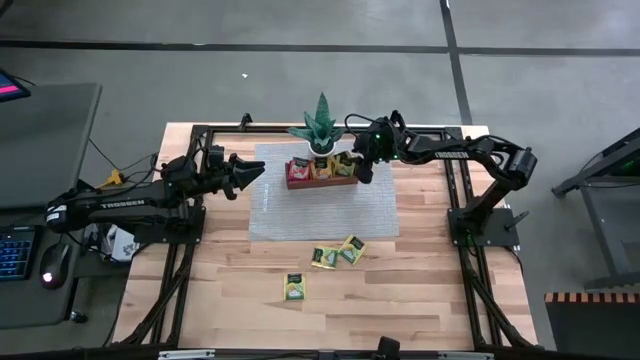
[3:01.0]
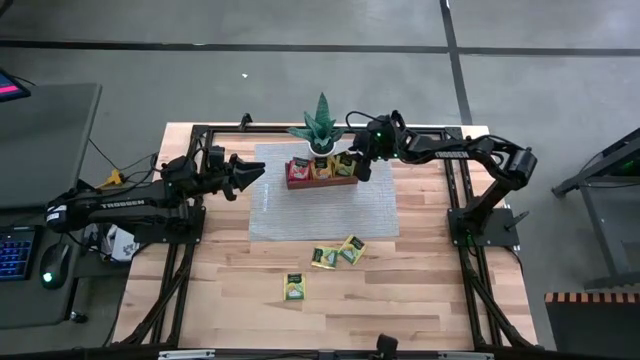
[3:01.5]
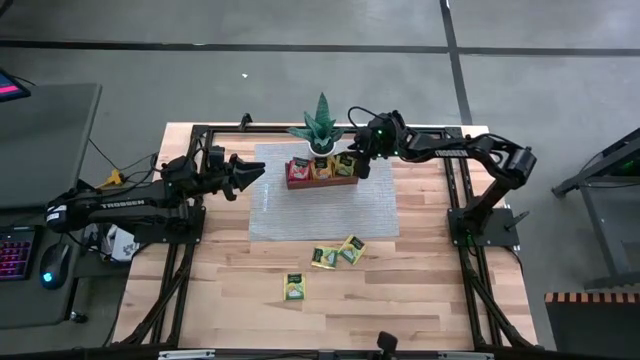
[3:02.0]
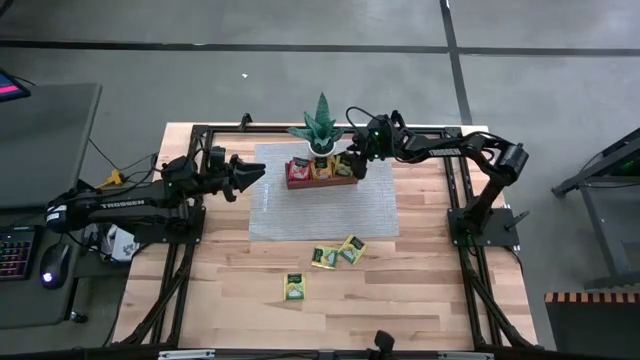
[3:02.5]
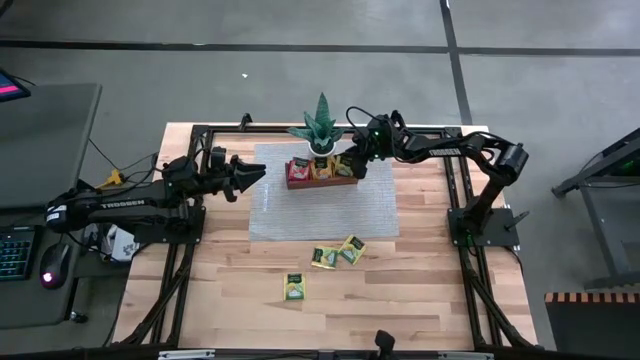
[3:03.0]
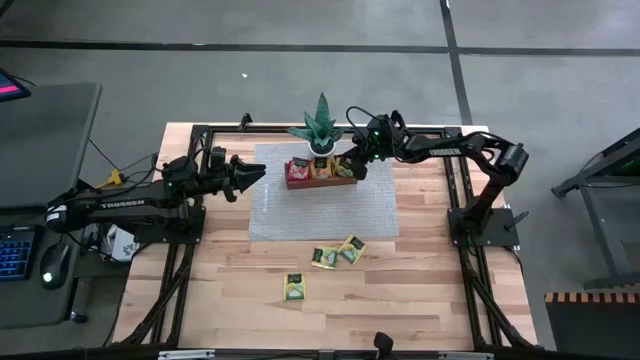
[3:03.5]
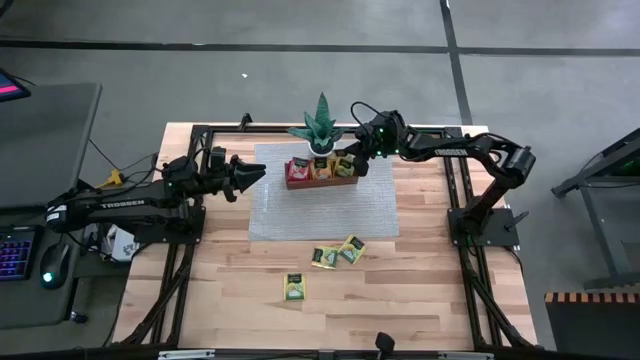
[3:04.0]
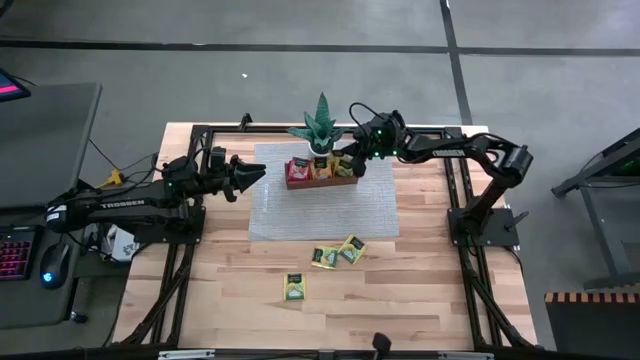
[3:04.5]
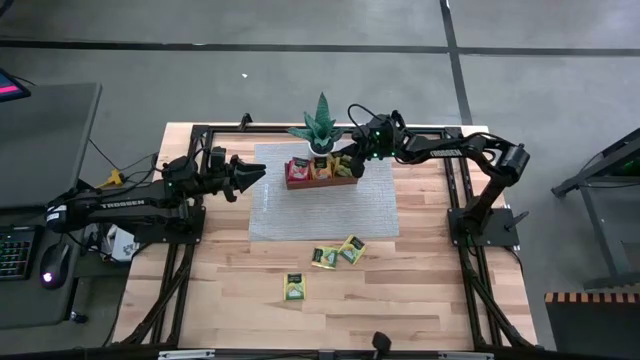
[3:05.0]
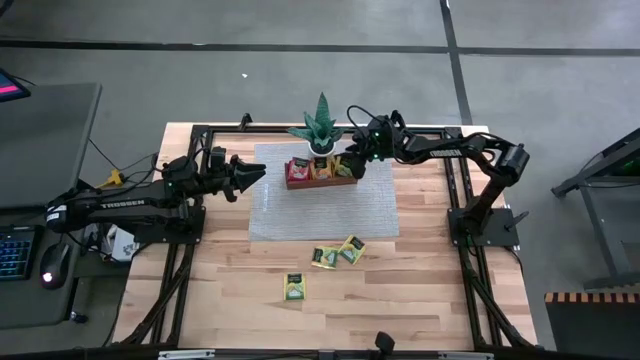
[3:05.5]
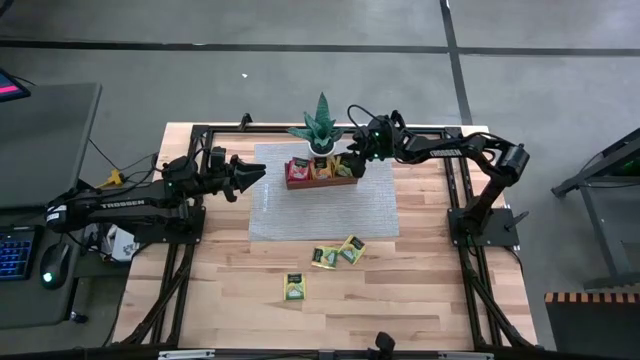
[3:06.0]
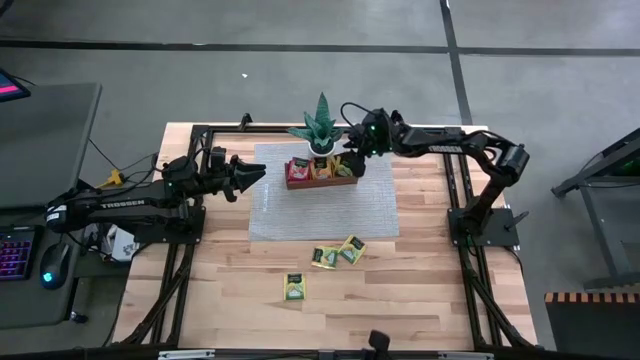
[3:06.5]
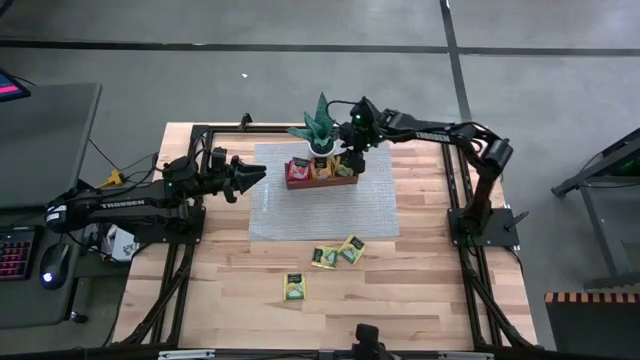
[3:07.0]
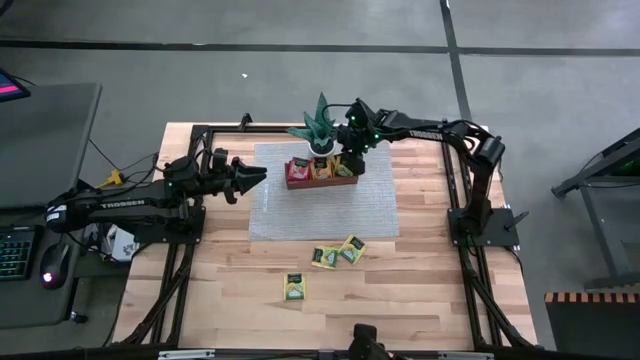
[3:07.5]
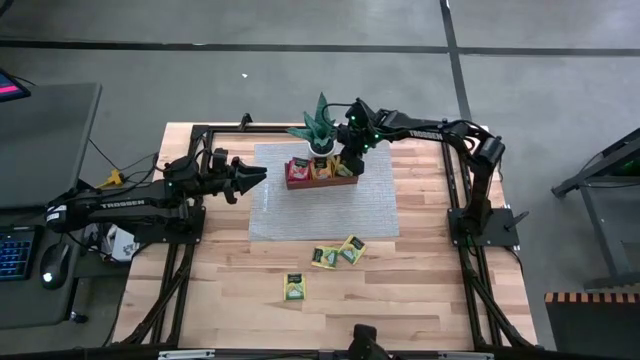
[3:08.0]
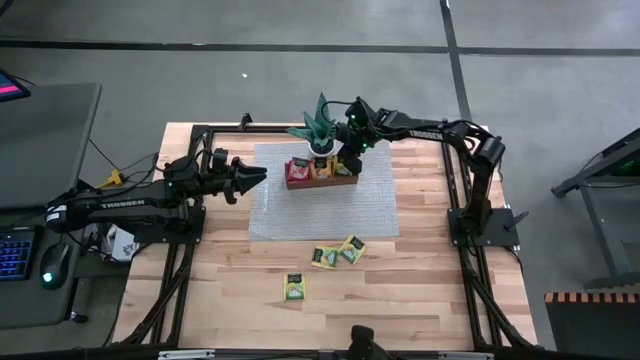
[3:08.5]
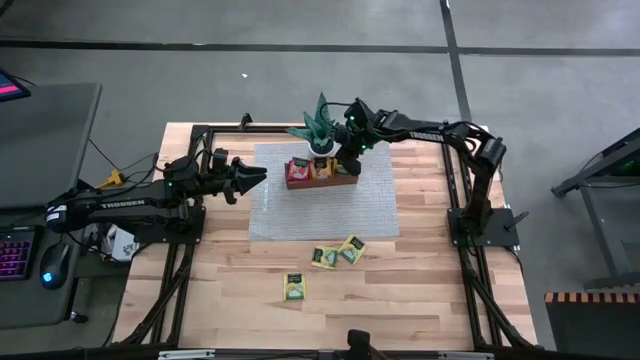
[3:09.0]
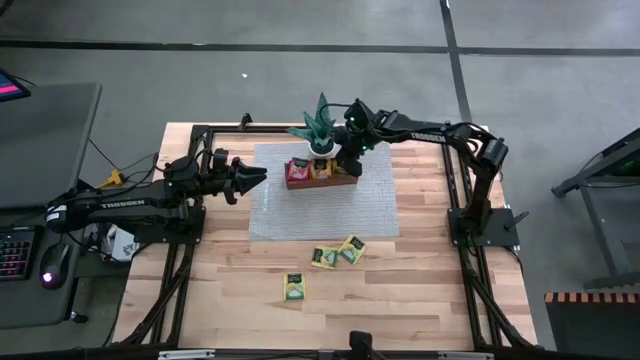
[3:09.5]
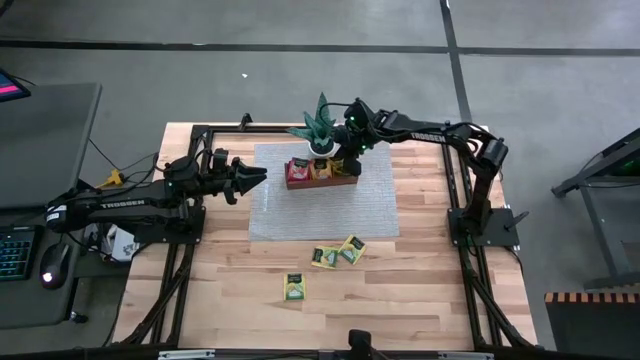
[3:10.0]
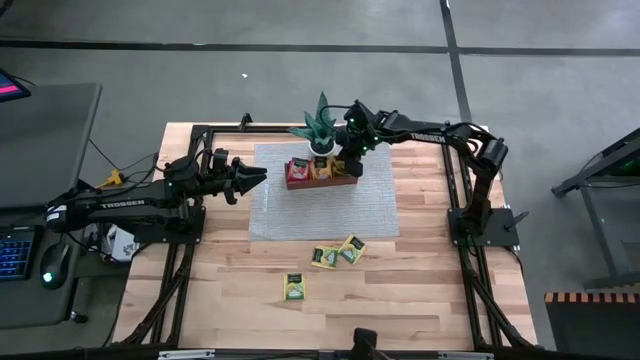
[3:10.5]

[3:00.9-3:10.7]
Task: Pick & Place Tea
Adjust the yellow tea bags in the right section of the wooden organizer

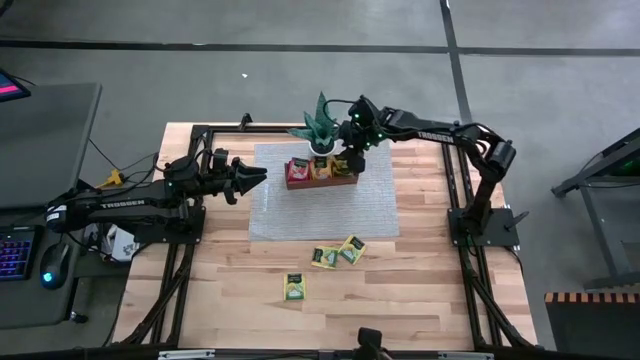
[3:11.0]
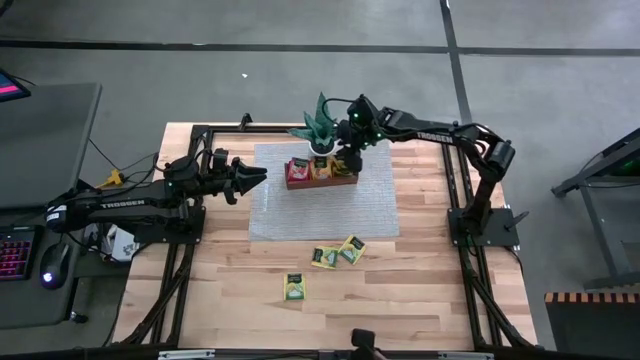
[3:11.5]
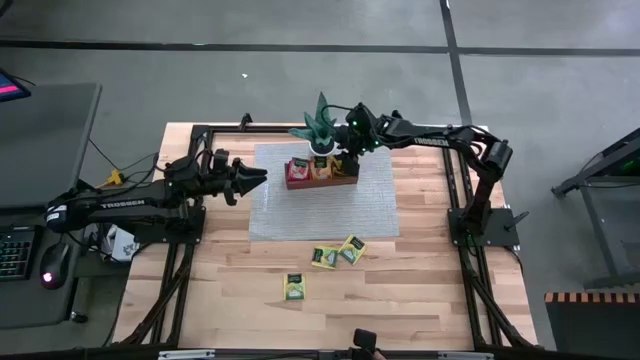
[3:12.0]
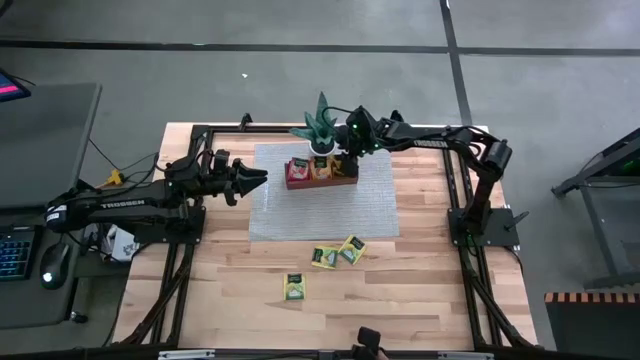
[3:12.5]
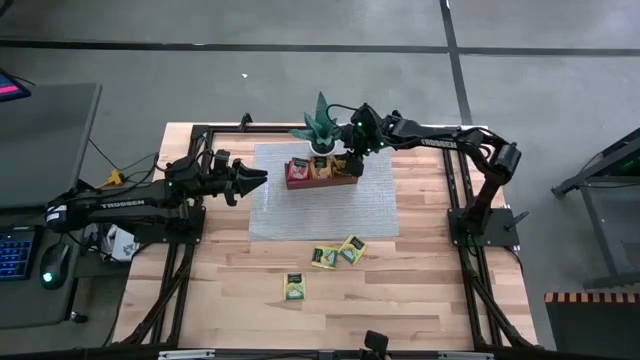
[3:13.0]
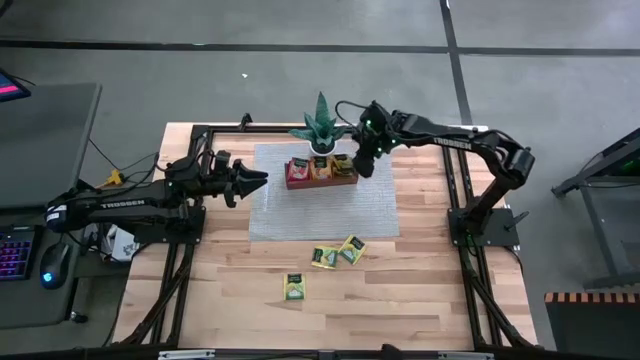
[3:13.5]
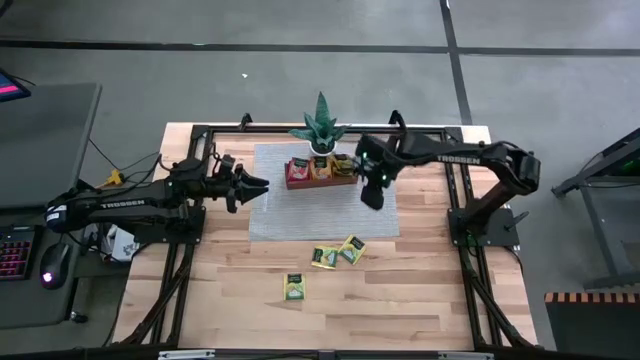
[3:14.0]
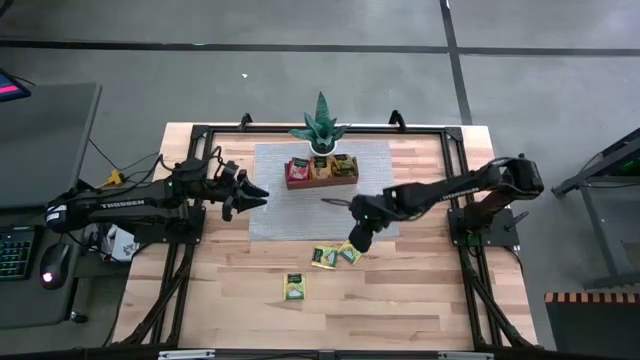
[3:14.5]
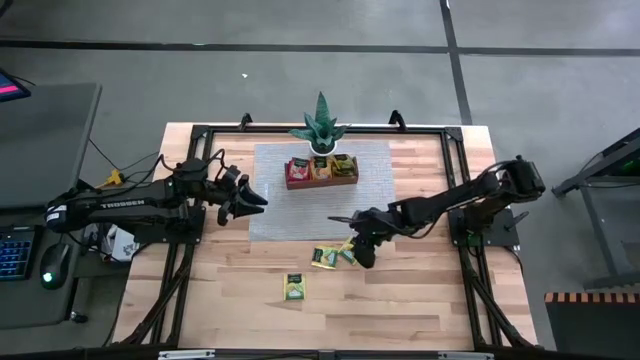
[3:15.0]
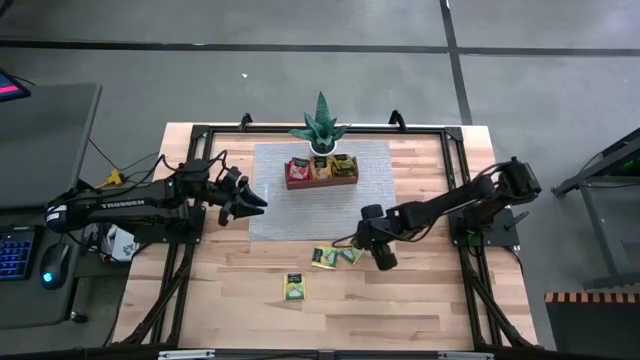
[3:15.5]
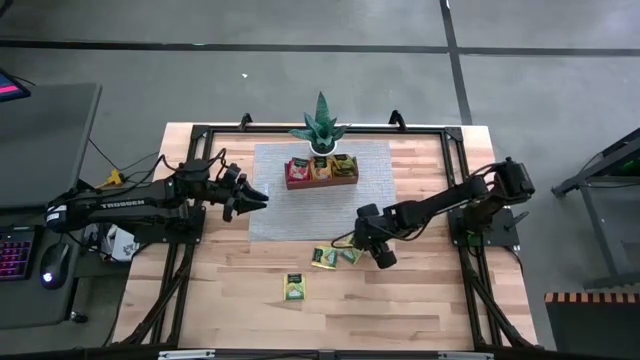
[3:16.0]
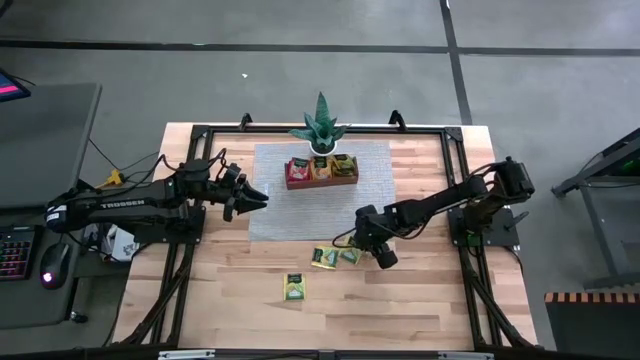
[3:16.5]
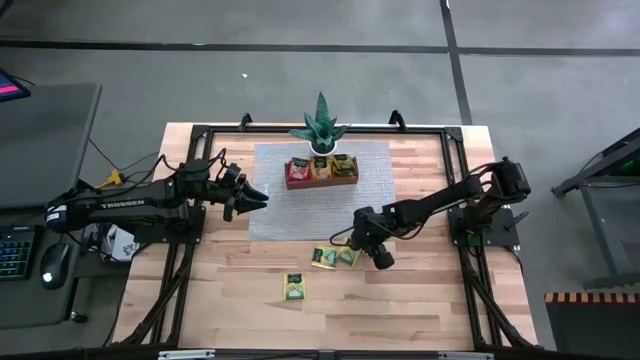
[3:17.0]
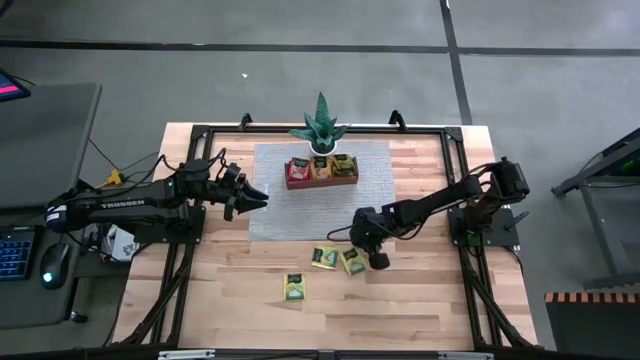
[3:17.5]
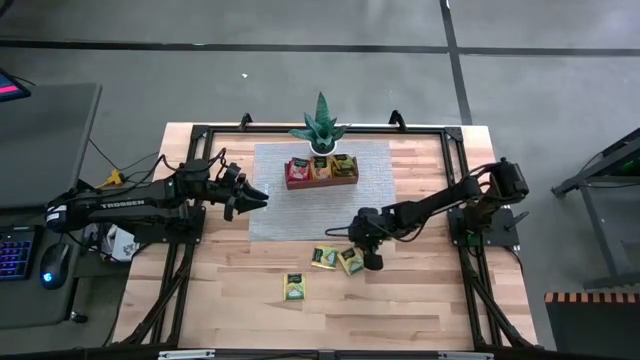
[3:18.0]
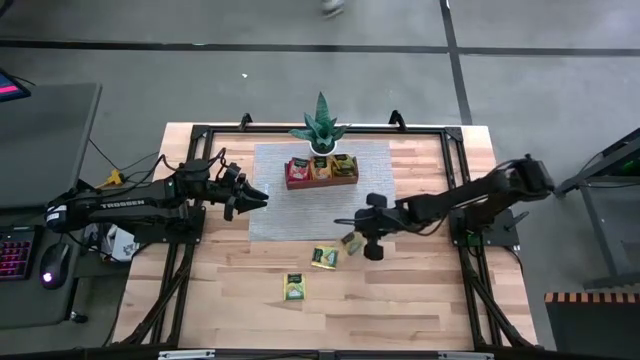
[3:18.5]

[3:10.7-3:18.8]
Put the yellow tea bag into the right section of the wooden organizer

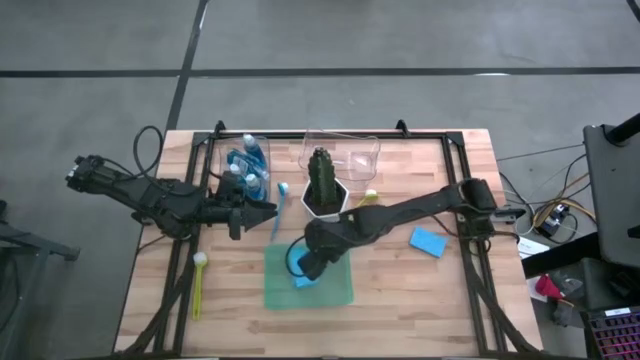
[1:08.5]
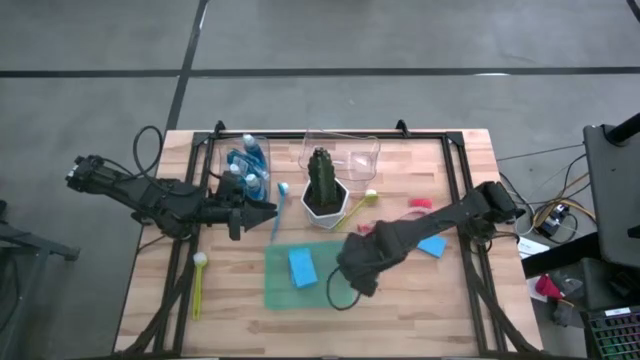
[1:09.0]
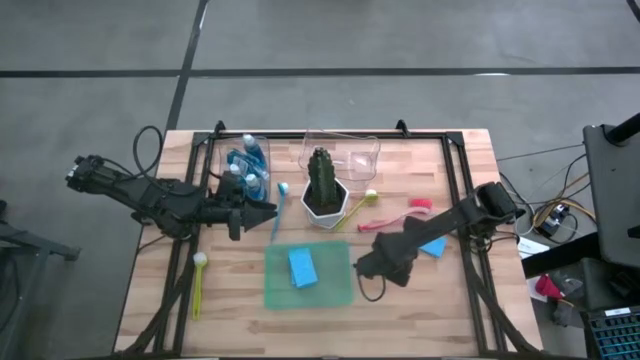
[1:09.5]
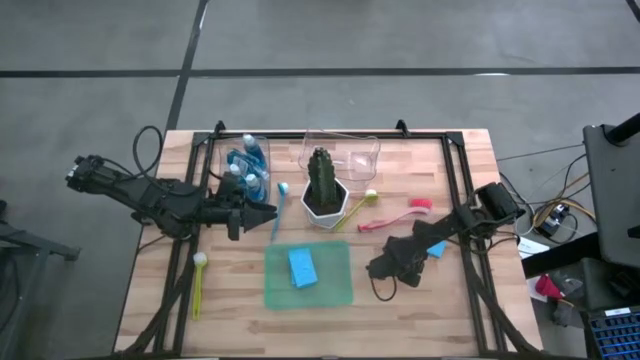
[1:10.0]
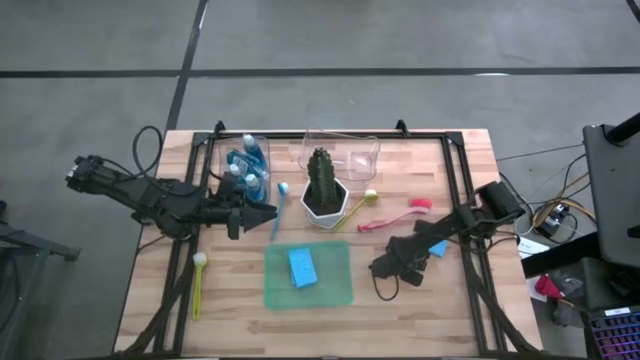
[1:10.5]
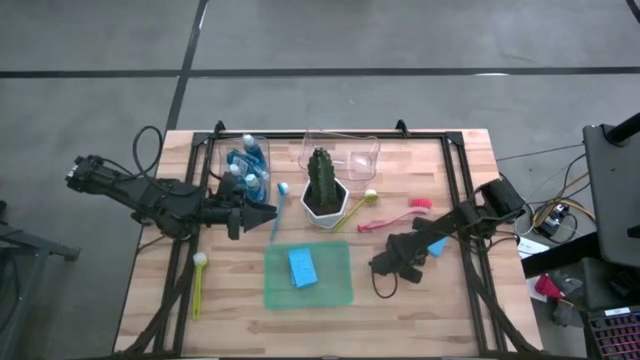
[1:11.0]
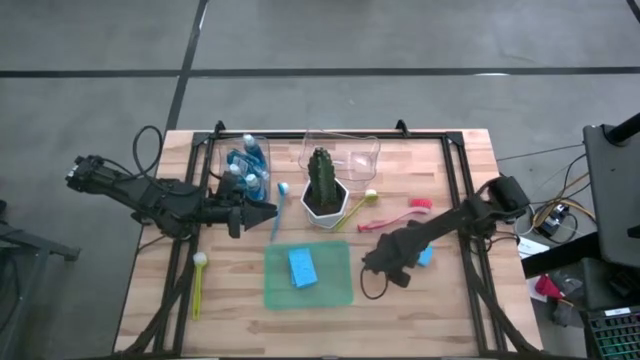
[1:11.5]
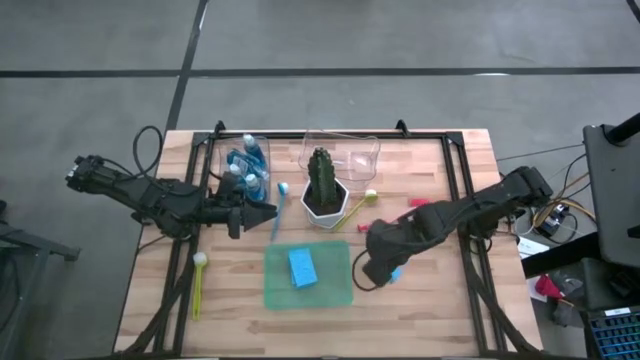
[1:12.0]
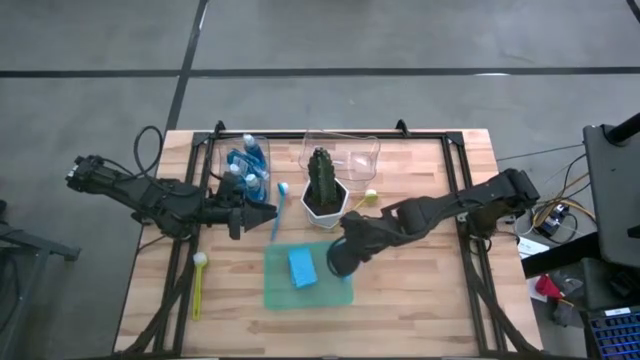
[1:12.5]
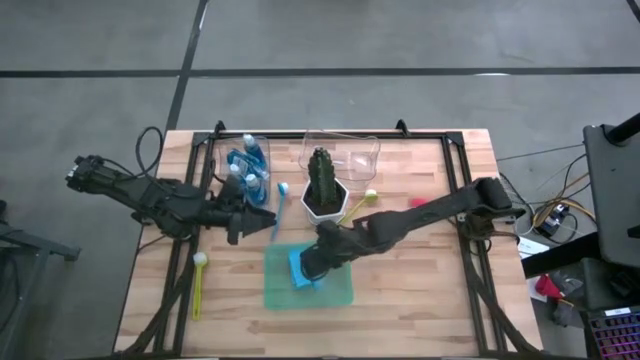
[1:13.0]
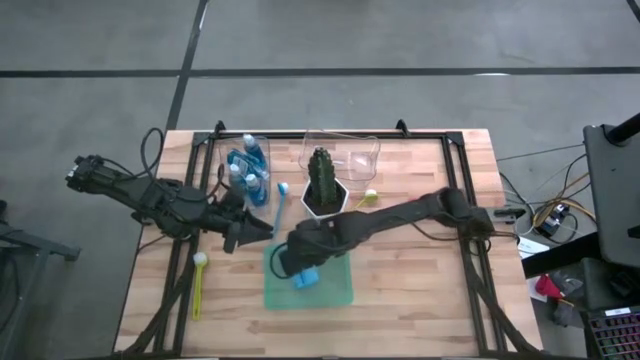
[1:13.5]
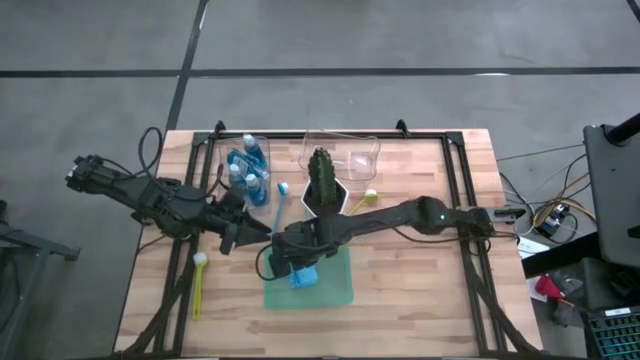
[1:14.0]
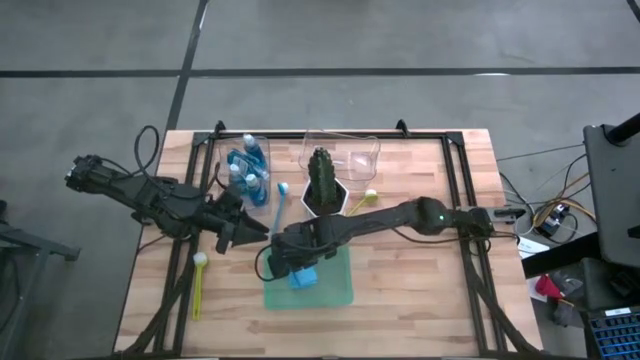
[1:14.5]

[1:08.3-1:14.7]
Task: Pick & Place Kitchen Sink Supplies
Put the blue sponge wipe into the green bin
